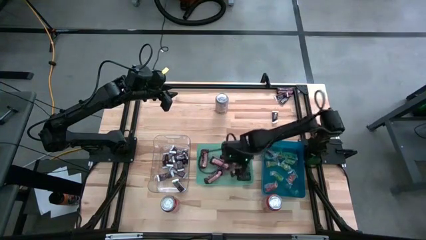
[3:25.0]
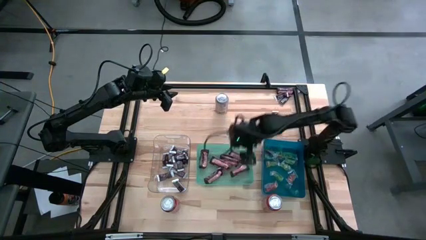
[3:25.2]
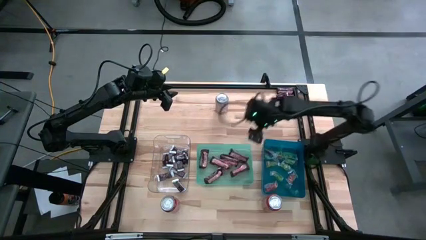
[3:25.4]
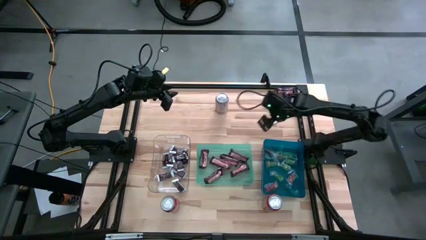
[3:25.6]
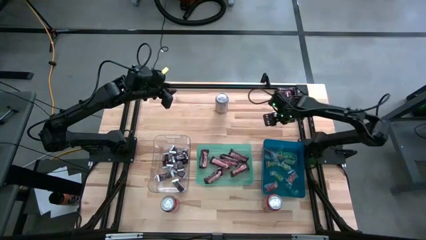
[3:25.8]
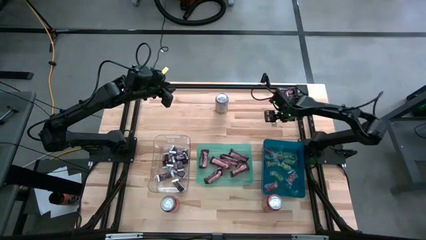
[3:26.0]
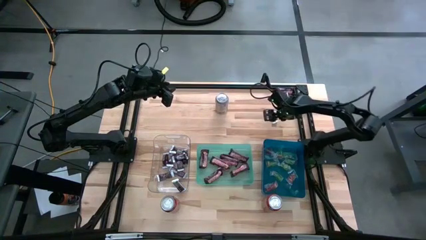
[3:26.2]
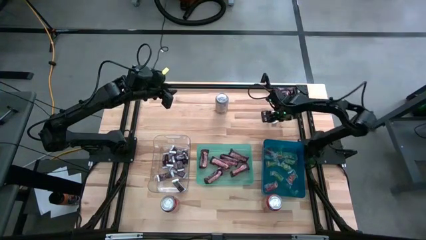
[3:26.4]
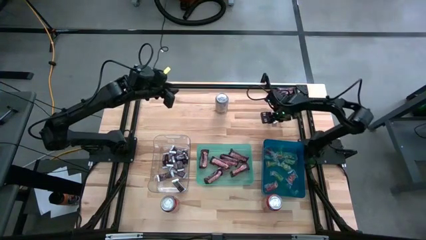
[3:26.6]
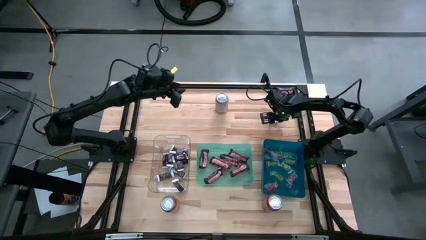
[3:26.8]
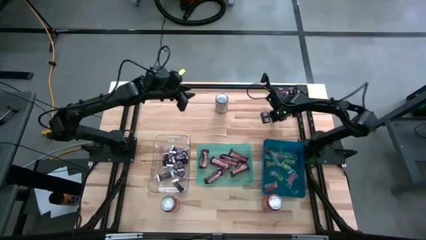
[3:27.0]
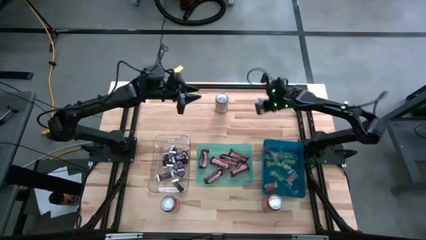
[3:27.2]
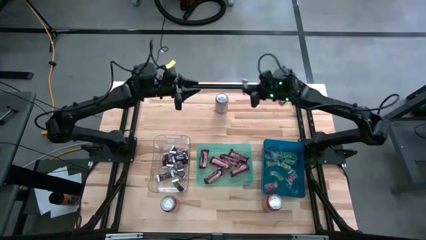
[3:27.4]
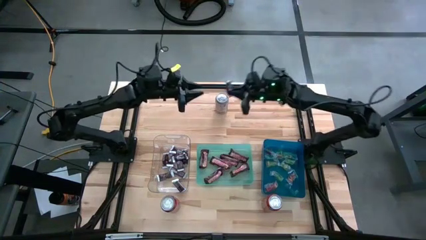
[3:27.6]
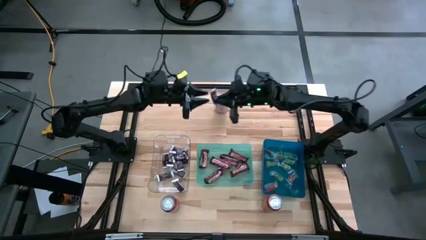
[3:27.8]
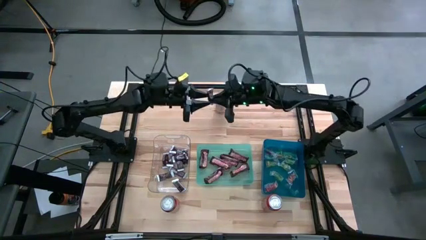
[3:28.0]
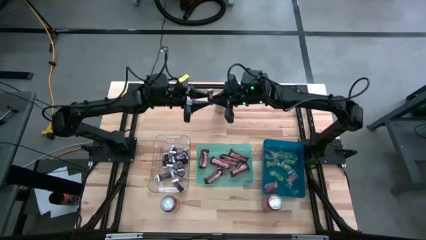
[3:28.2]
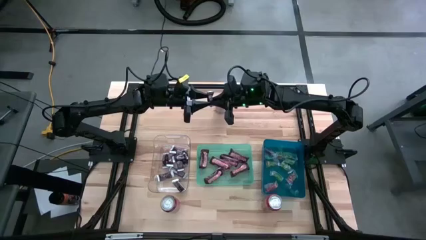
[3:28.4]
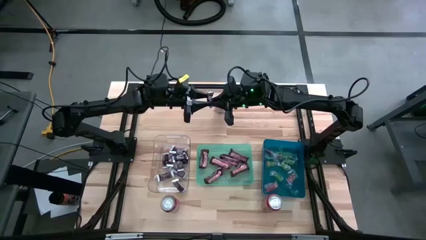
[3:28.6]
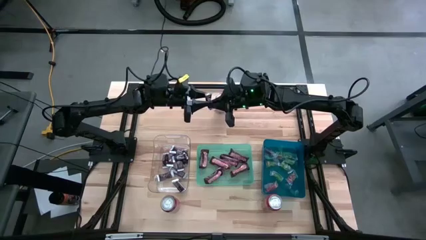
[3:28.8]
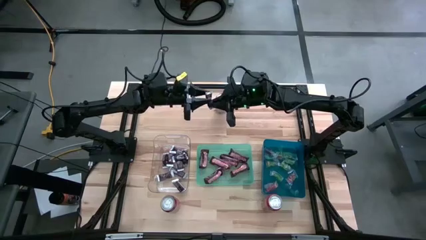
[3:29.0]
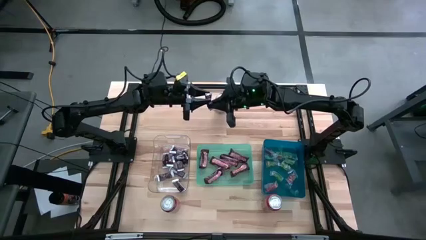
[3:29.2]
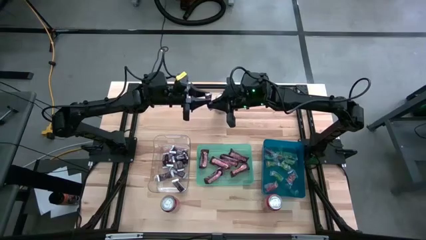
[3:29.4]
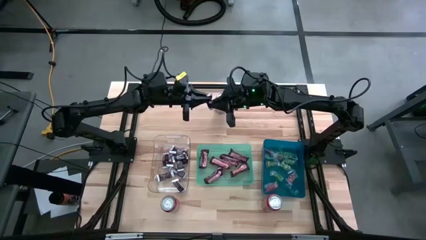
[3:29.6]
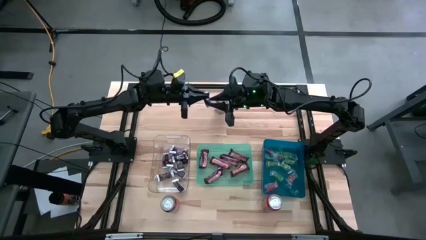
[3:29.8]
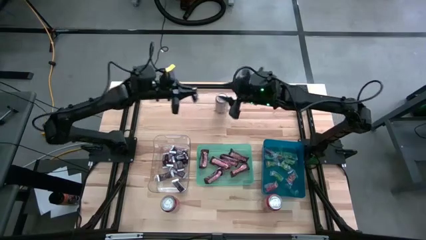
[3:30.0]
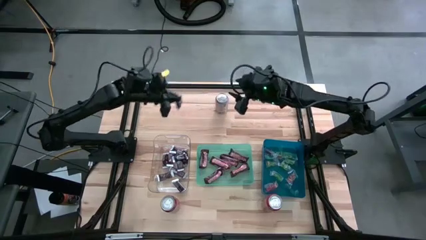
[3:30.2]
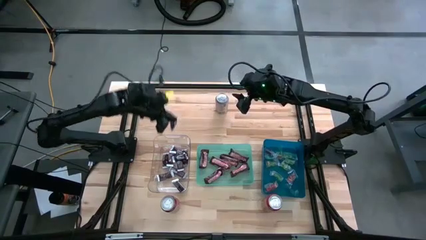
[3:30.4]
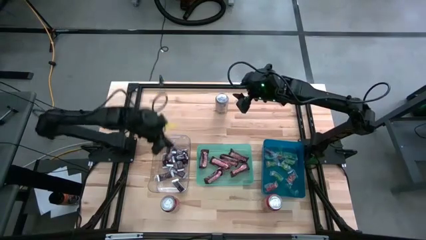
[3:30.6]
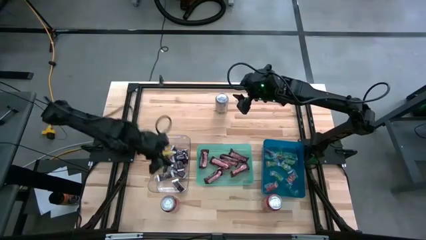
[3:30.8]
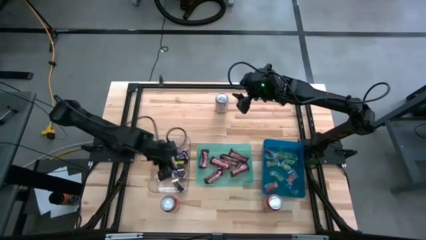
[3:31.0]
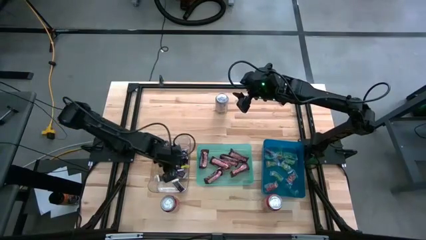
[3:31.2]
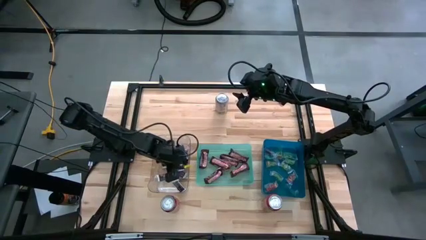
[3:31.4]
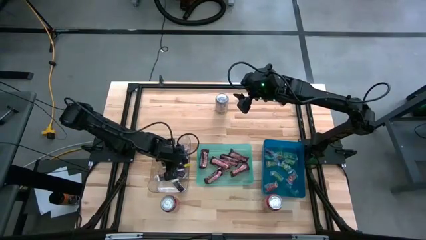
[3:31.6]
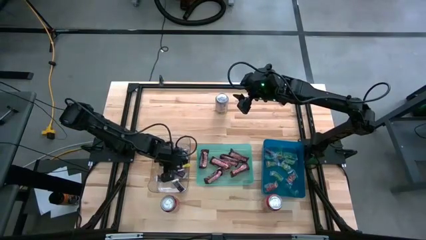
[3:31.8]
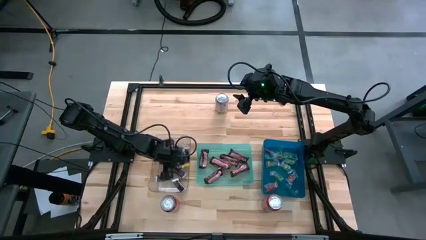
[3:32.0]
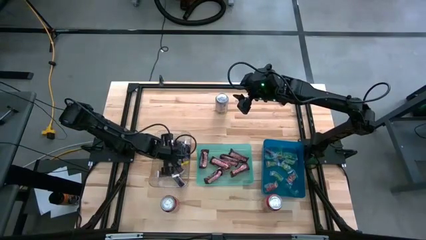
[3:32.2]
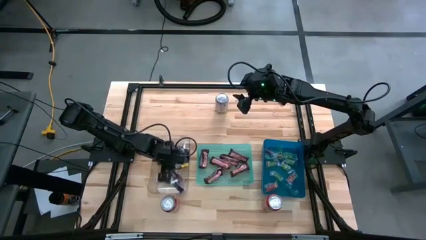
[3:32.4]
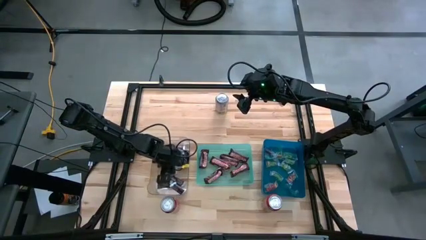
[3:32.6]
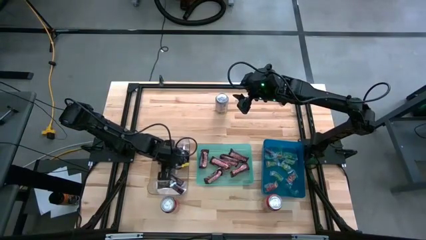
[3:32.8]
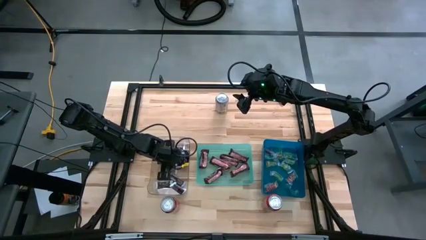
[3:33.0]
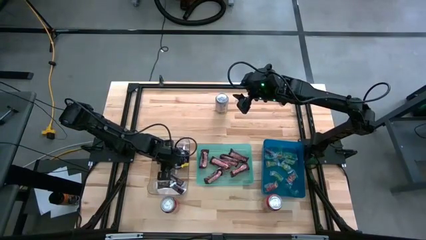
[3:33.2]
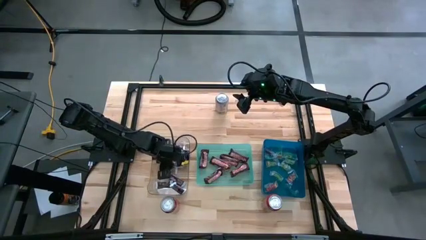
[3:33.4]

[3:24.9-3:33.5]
Task: Organize candy in baskets
Put the brown white chocolate bar into the transparent bin

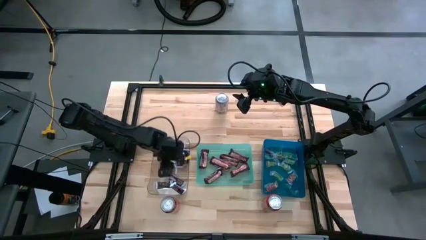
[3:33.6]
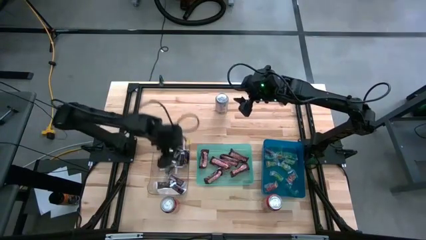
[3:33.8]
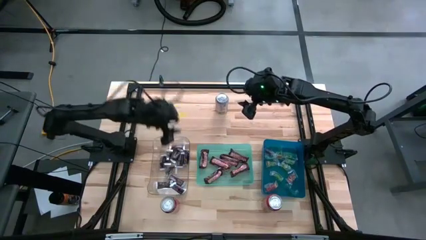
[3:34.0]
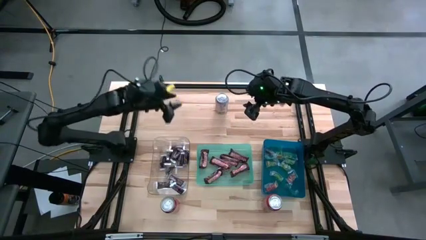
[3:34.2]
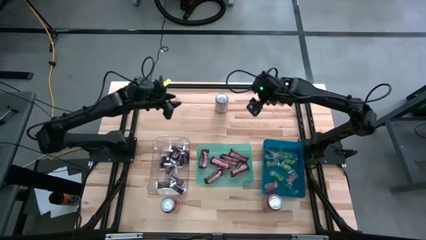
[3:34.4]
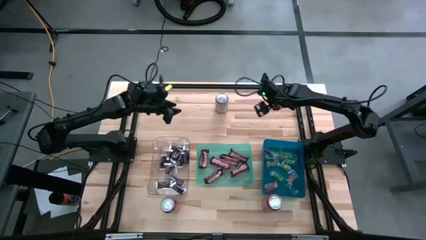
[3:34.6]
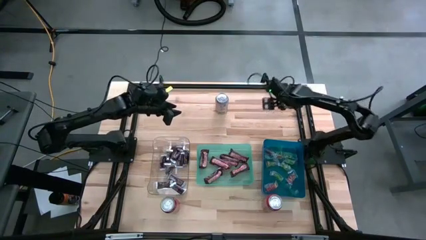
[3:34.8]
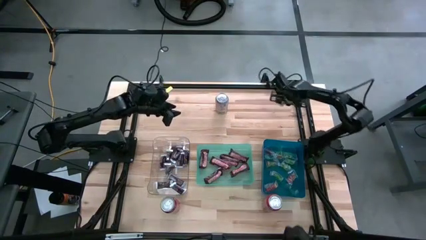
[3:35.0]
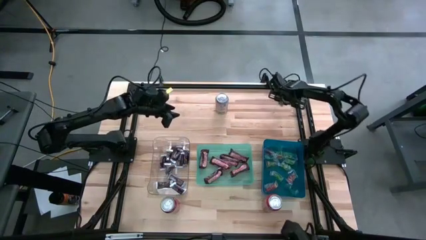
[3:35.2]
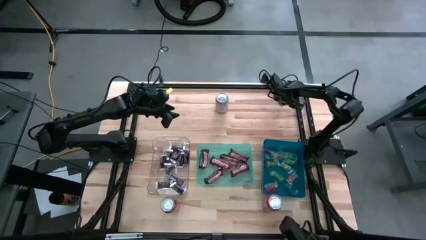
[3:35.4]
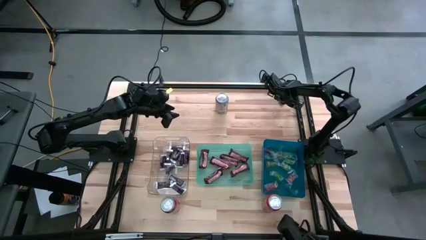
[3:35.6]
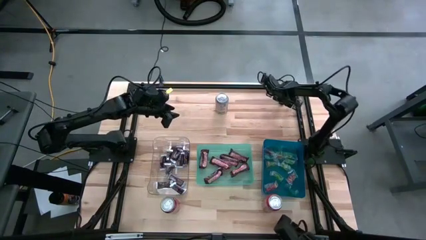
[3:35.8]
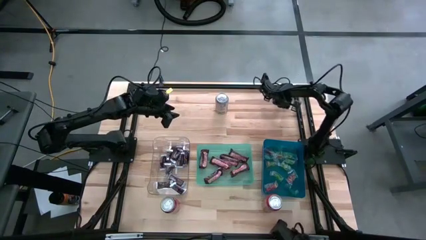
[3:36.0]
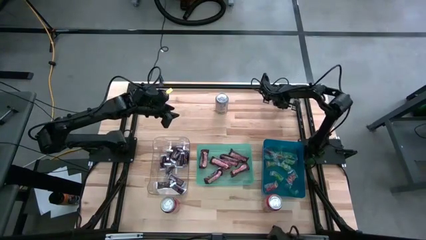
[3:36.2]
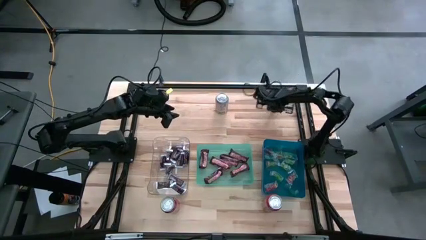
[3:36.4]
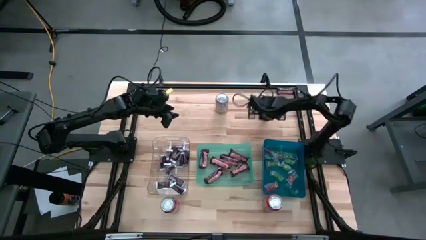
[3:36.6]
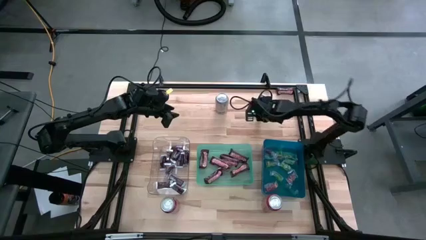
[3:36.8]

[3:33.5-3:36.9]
Put the brown white chocolate bar into the transparent bin

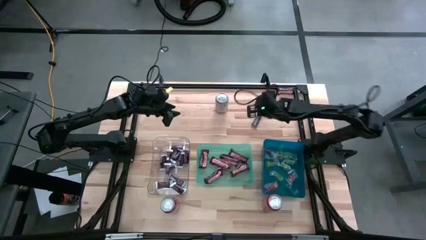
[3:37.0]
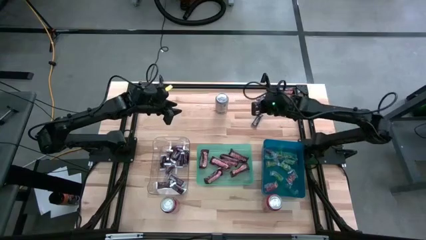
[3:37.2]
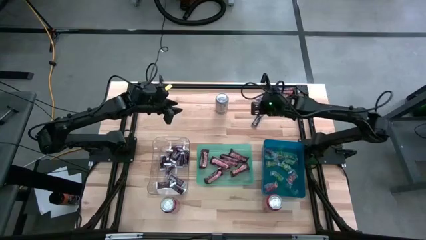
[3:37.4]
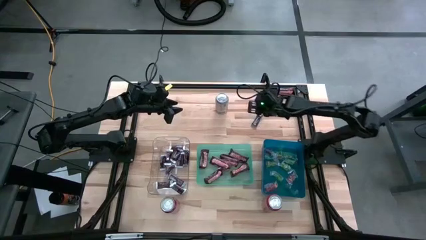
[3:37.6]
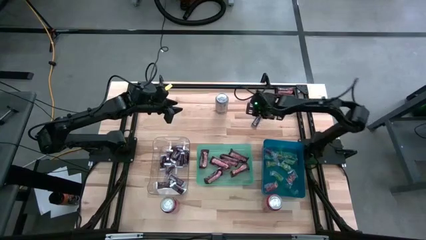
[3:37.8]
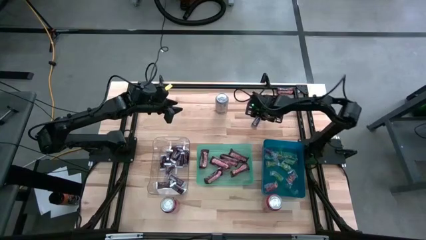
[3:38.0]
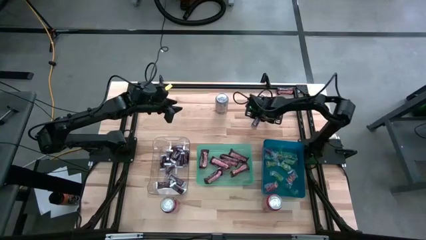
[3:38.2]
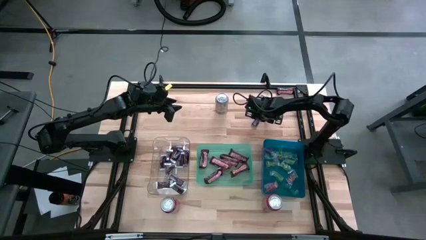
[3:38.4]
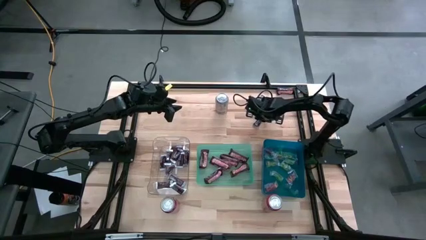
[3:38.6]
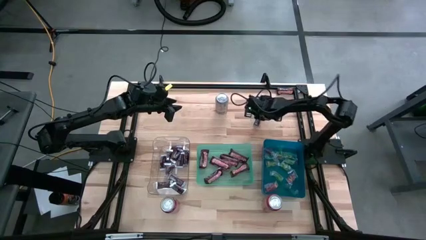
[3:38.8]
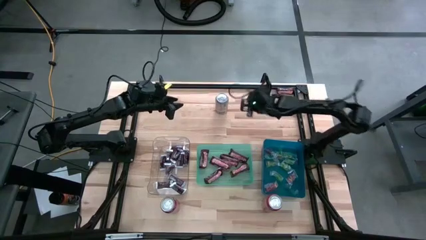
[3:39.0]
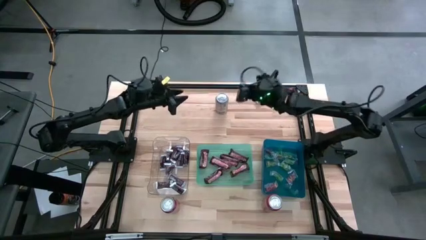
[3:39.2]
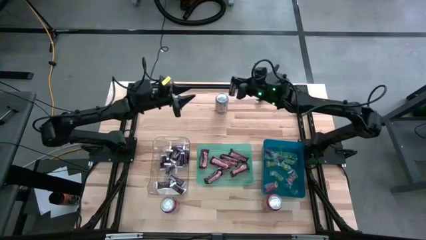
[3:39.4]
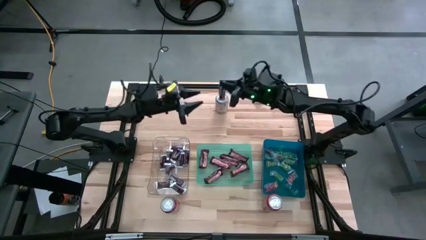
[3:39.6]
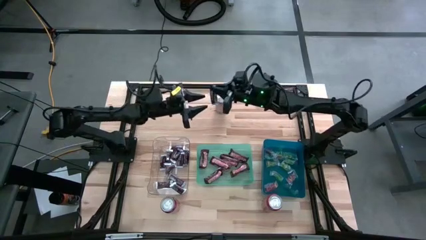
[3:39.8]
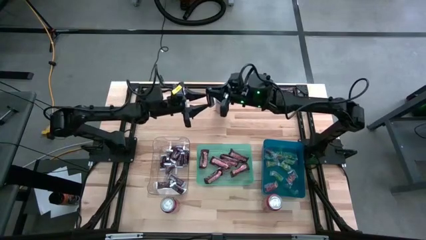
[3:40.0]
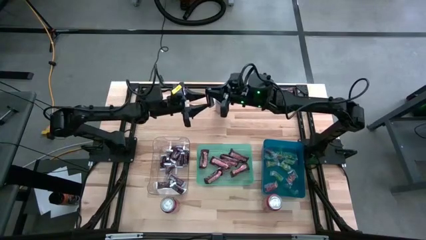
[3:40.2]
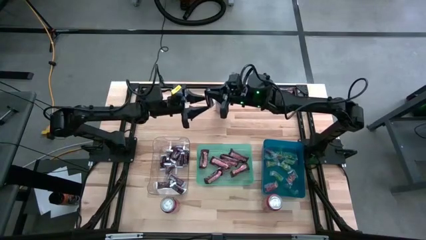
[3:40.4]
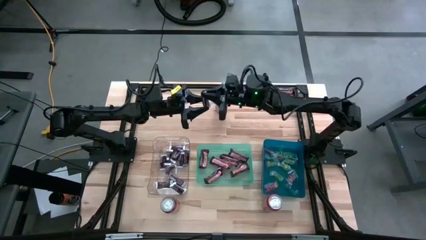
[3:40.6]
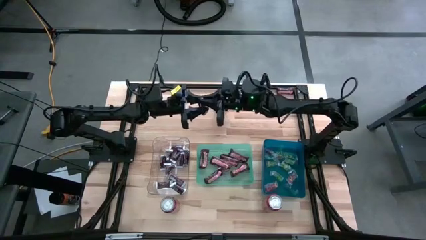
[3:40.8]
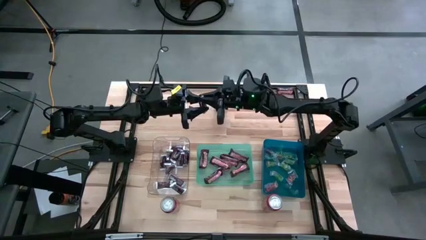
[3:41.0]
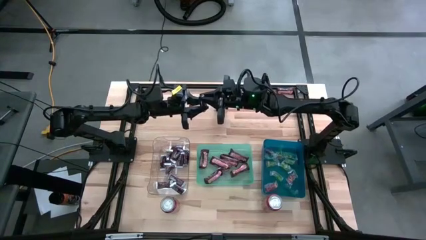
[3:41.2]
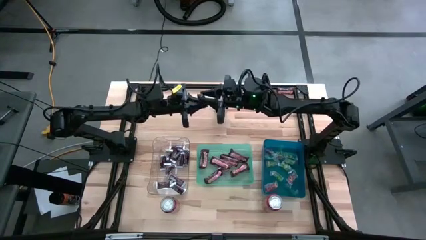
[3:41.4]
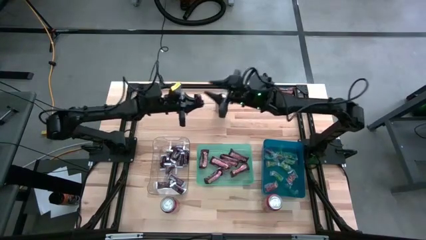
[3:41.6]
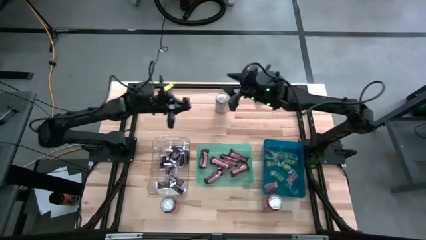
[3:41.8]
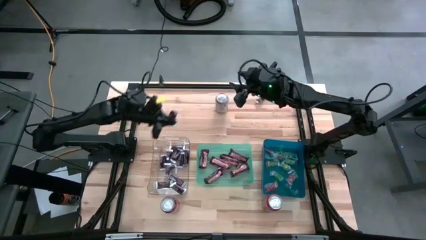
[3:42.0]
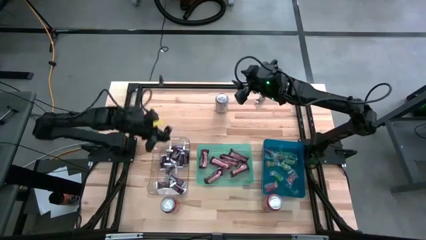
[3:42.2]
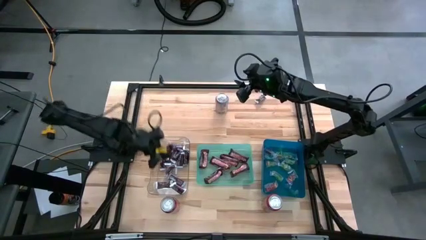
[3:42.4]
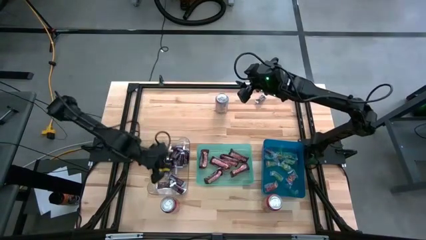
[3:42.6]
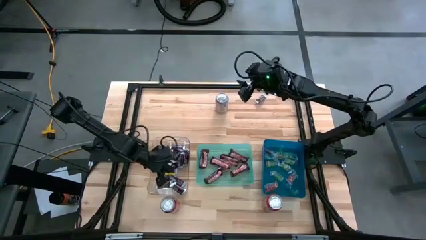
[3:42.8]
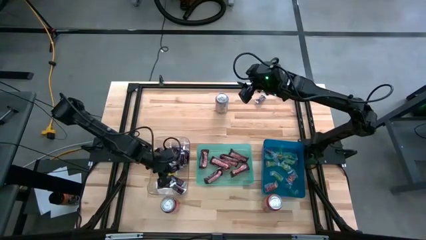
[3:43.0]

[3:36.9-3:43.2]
Put the brown white chocolate bar into the transparent bin
